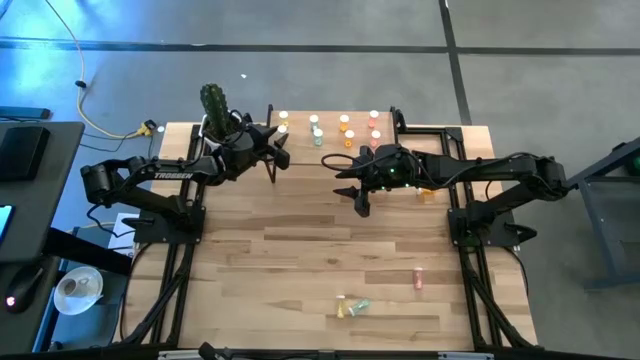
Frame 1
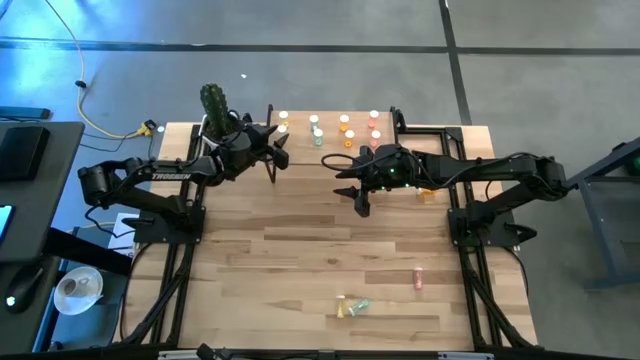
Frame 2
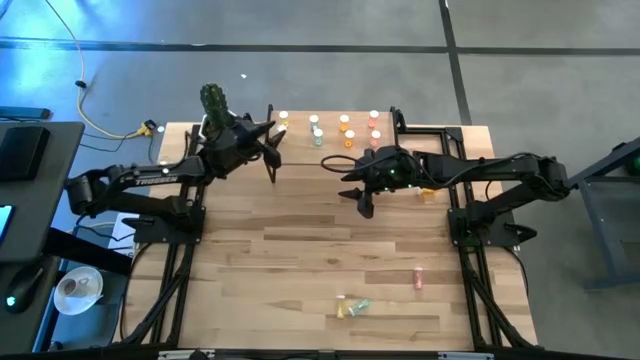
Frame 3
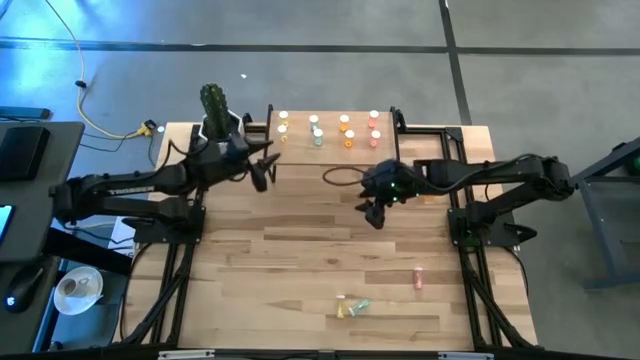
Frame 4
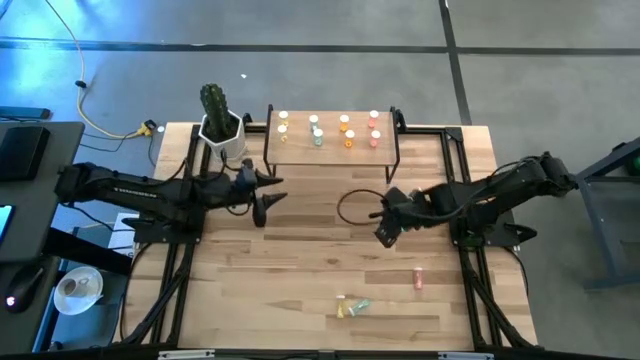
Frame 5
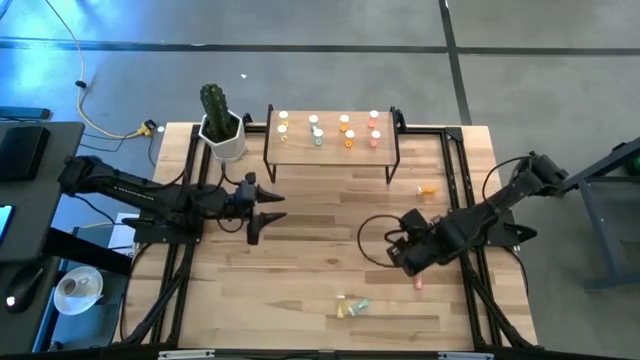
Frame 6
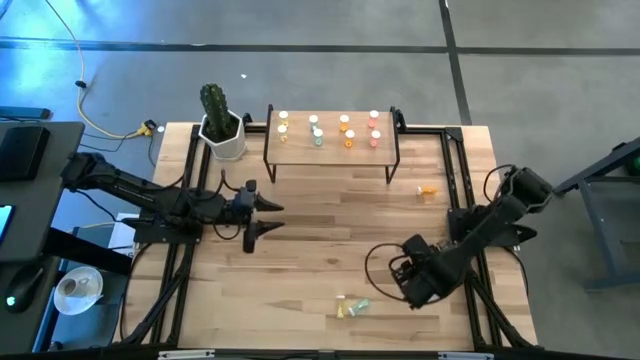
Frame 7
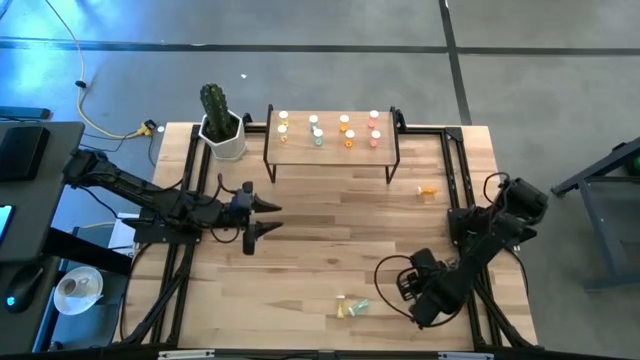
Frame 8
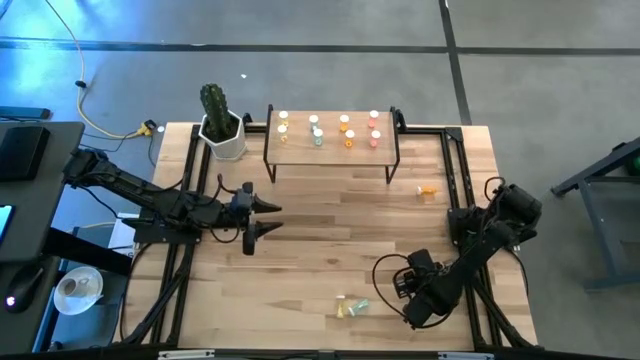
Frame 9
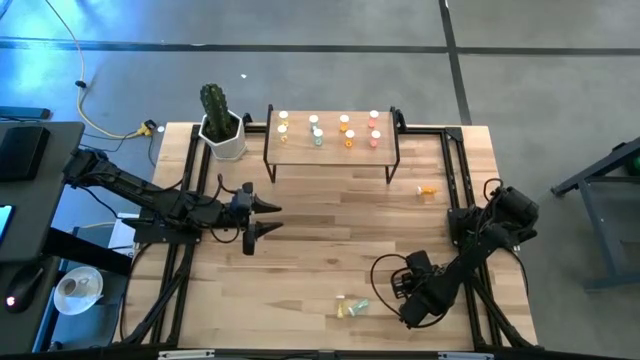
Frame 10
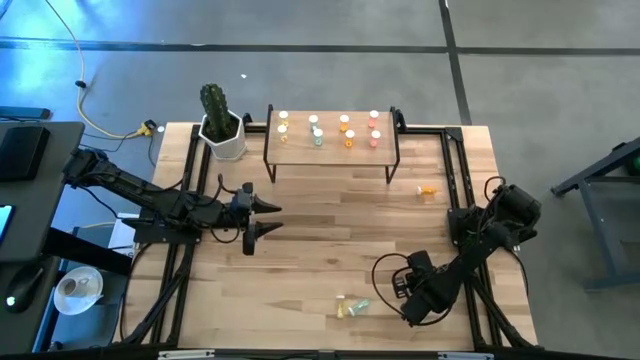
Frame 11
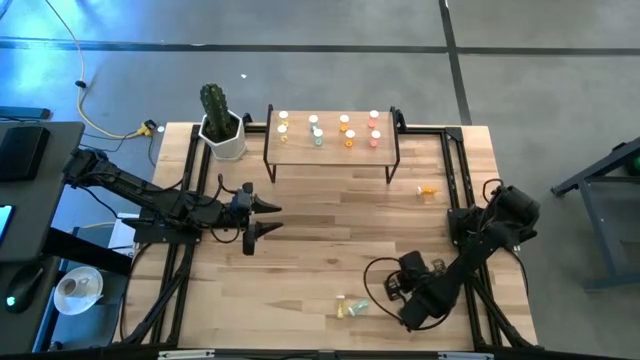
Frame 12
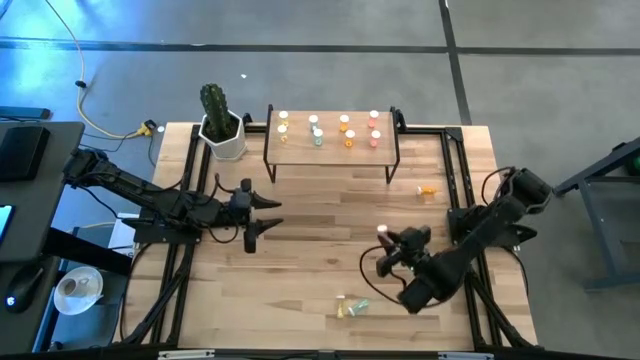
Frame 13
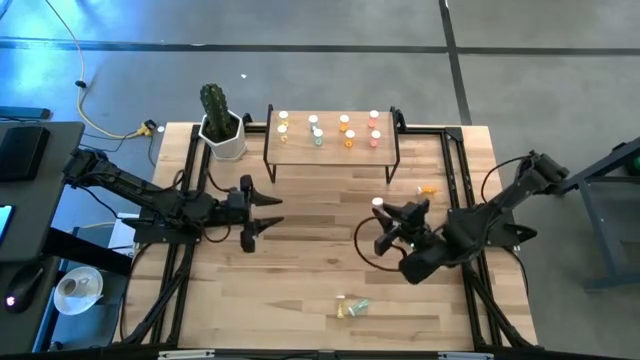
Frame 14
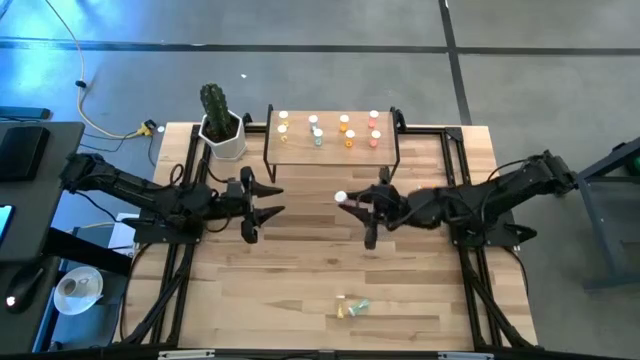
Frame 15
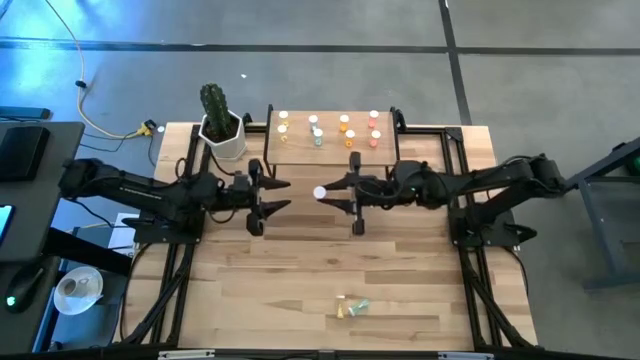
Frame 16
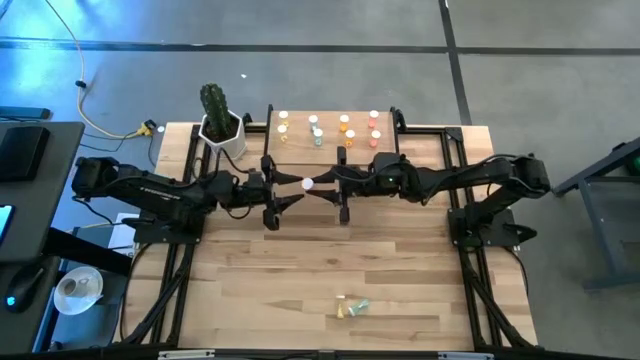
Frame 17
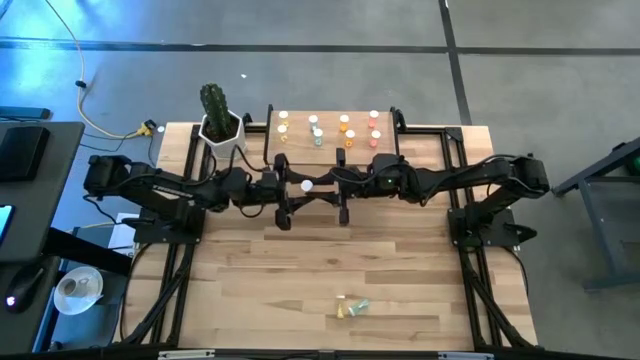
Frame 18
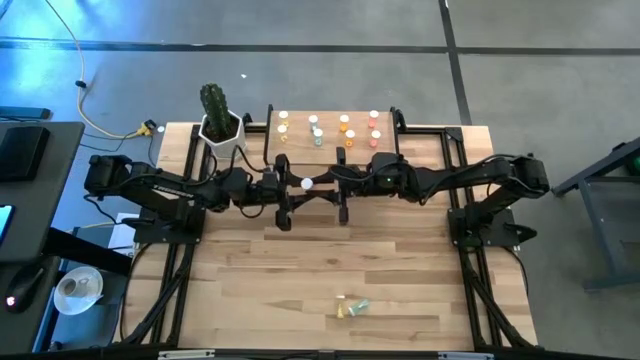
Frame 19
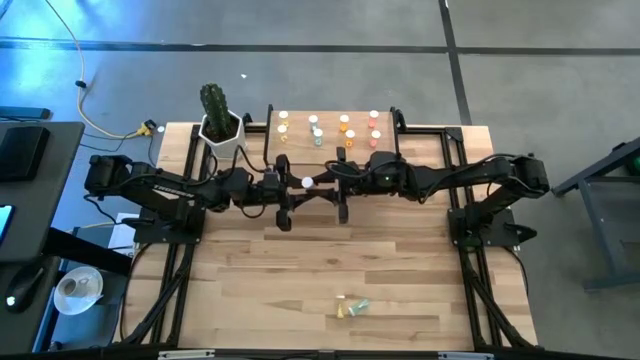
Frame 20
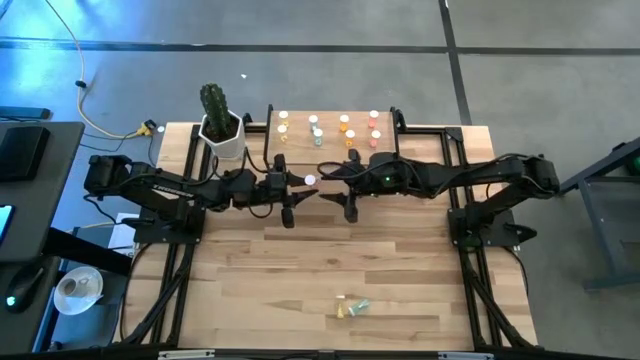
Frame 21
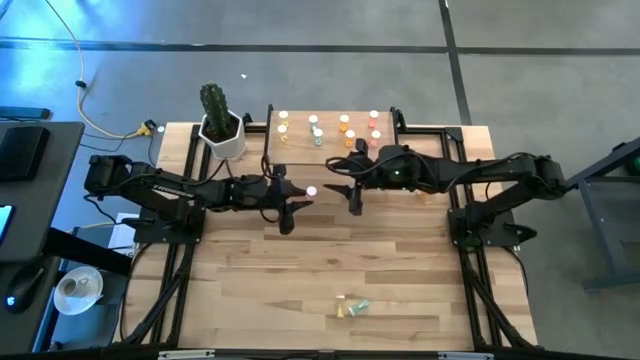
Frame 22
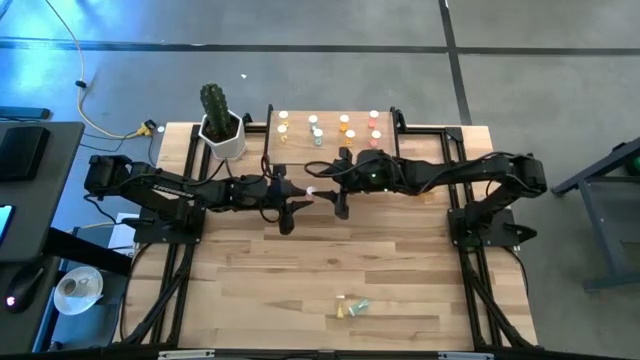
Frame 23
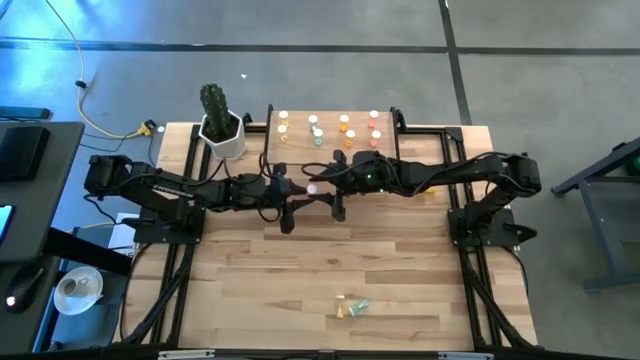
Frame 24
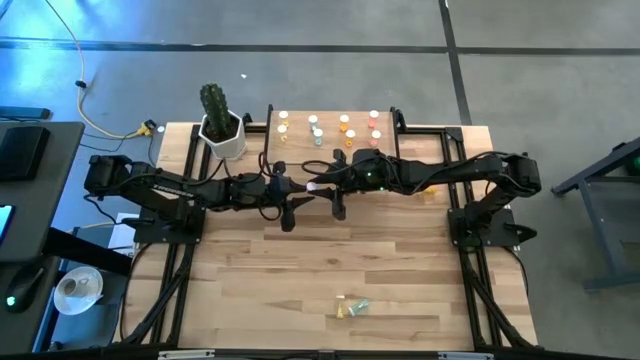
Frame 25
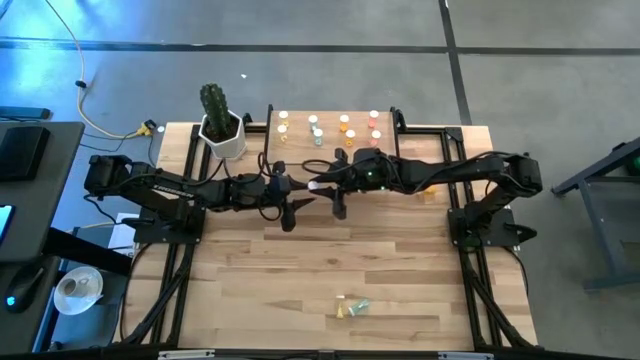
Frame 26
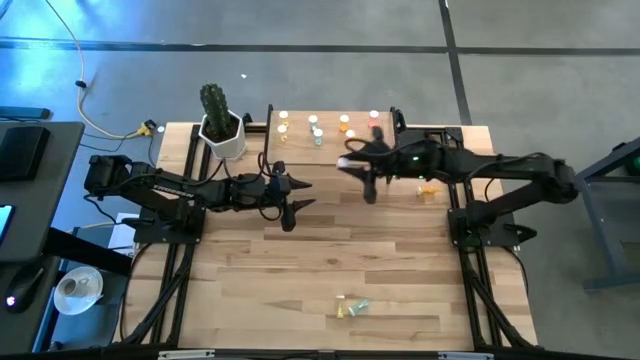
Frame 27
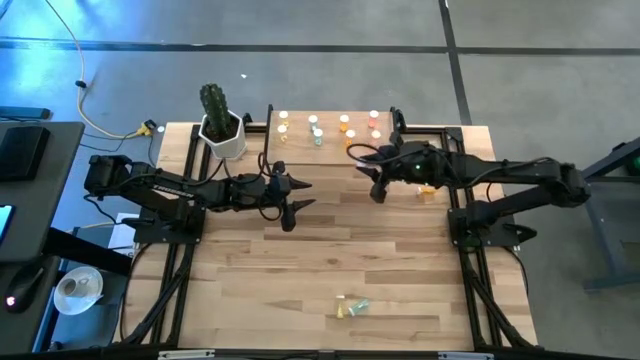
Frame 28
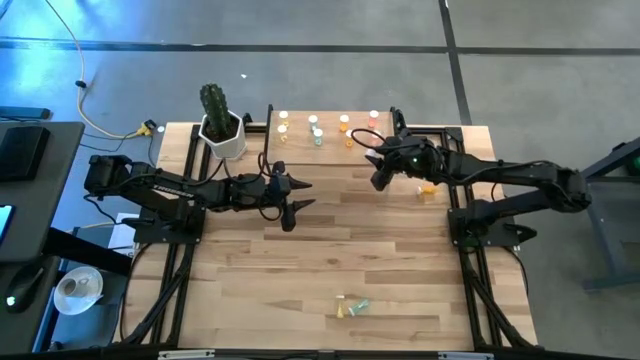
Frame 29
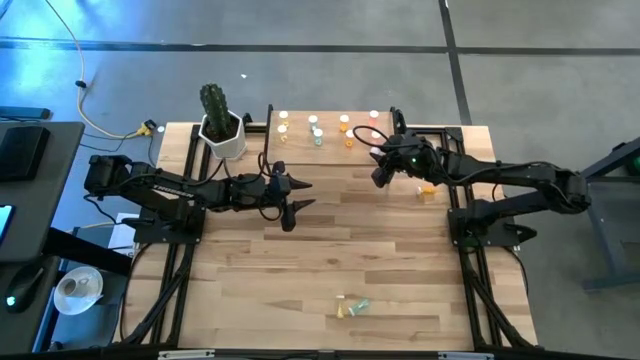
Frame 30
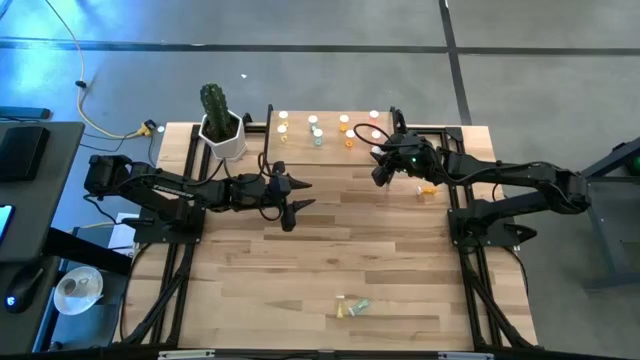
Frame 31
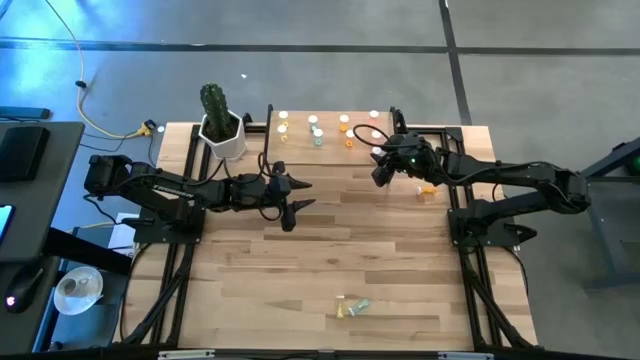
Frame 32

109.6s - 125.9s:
Task: Pick and place medicine bottles onto shelf by color
Put the pink pill bottle on the shelf aligned with the other pink pill bottles

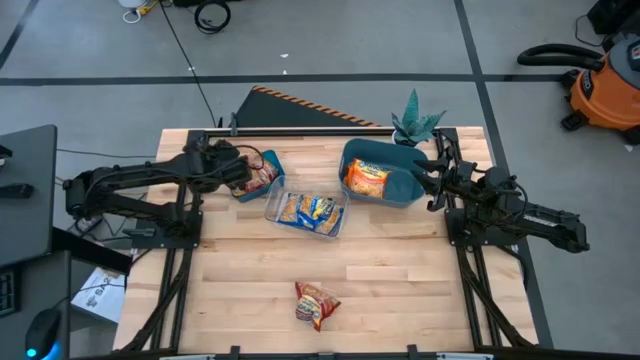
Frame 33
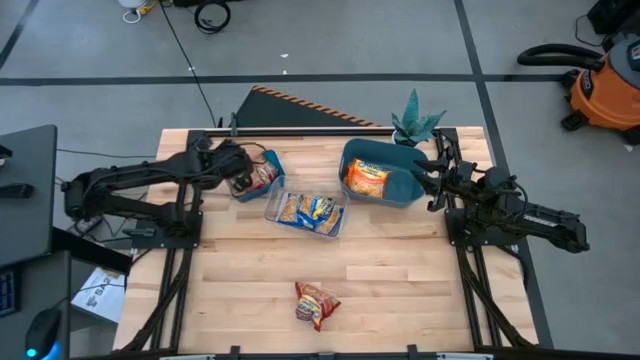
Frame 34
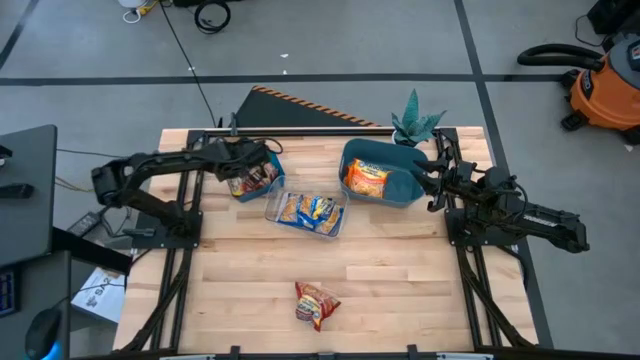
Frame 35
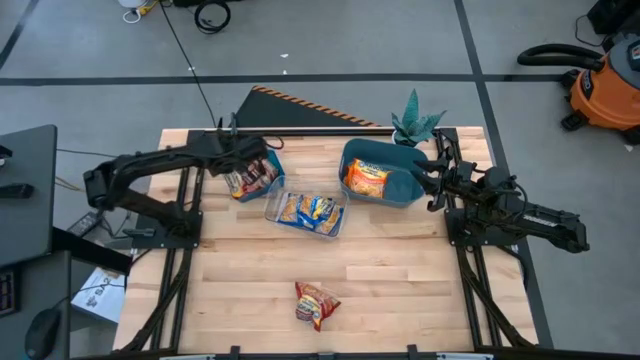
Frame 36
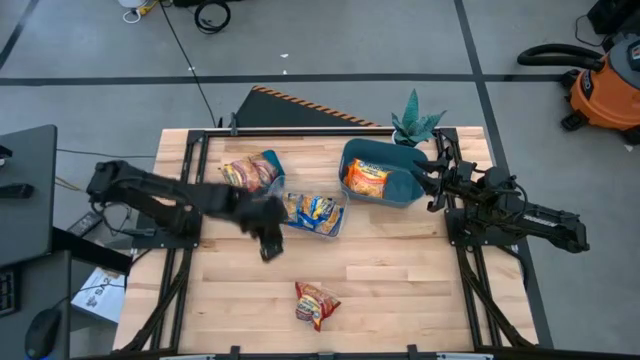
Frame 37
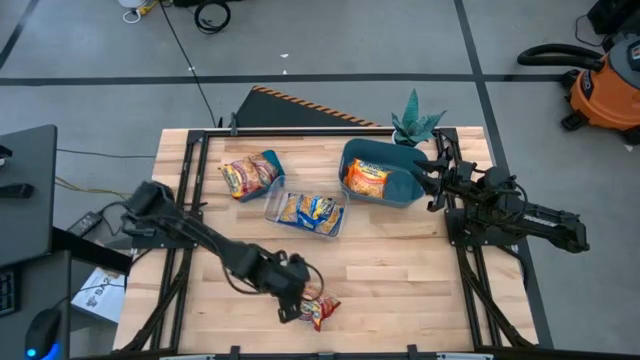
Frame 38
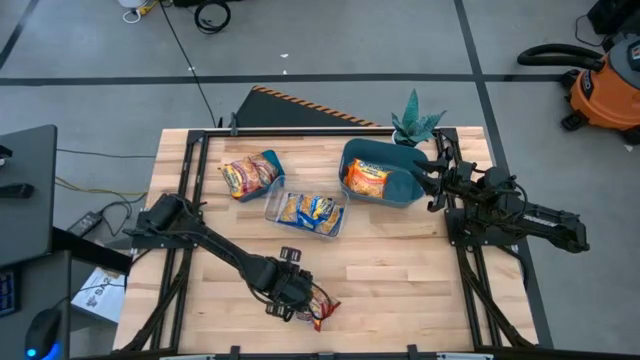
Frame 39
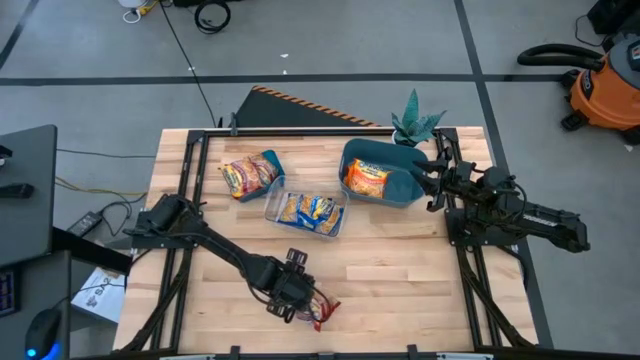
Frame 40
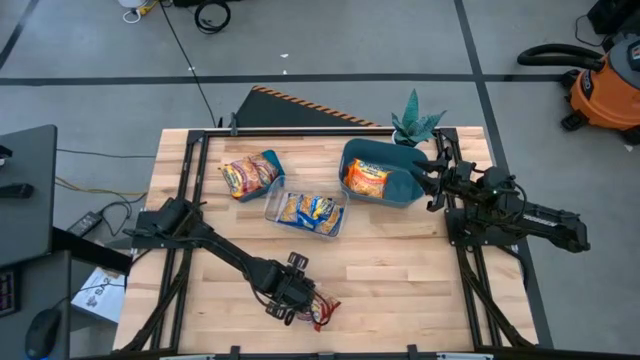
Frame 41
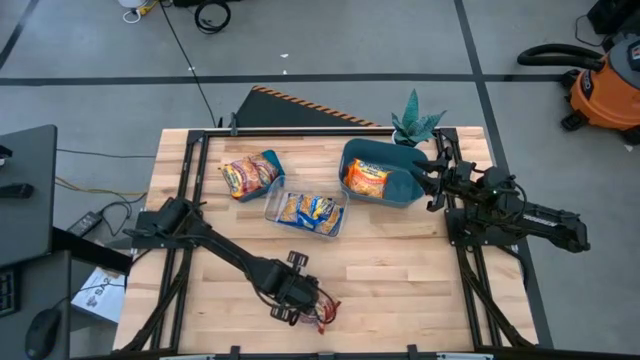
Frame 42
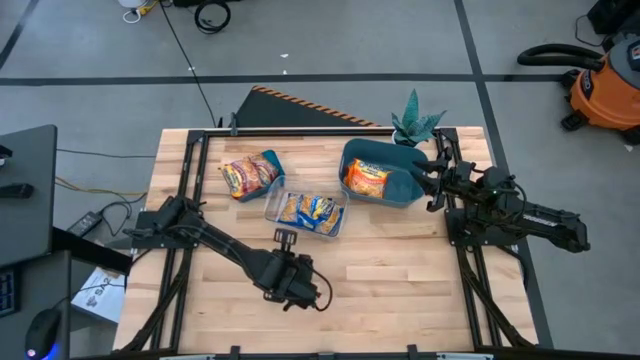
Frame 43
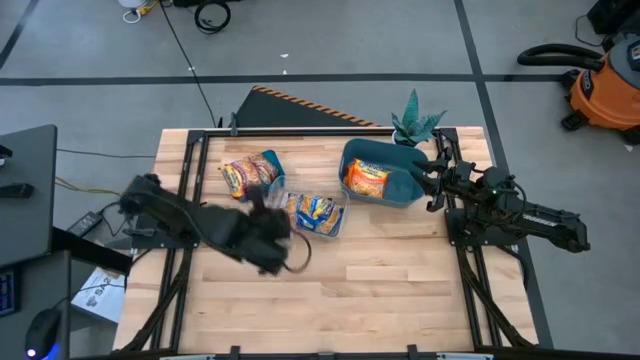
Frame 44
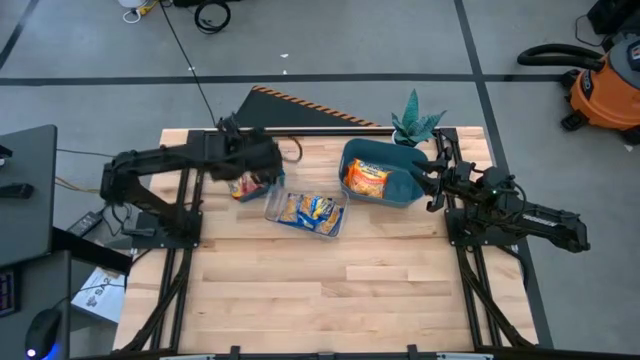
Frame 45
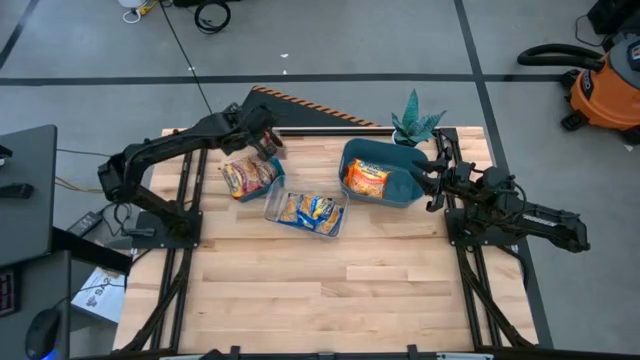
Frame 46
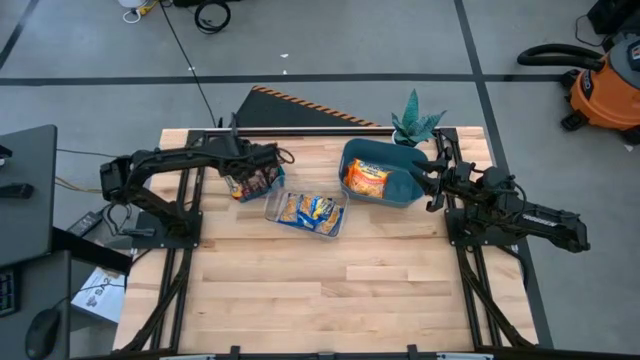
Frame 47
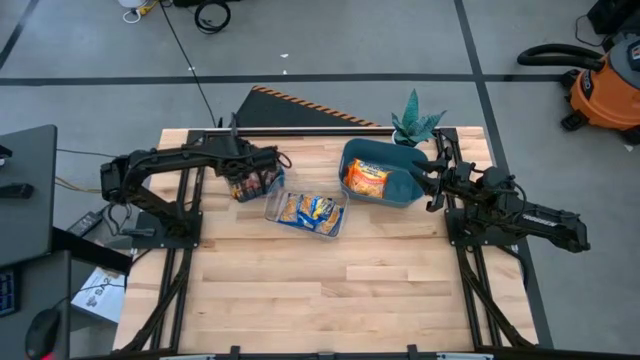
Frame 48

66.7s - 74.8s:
Task: Sort Maruchan noodles
Put the red noodle pack into the left small blue bin
